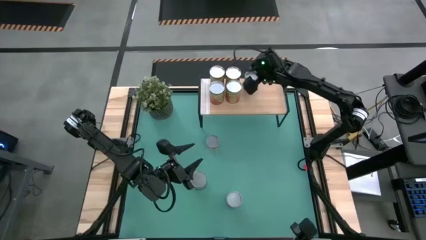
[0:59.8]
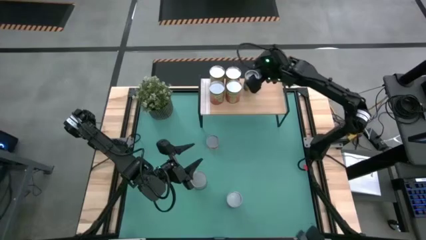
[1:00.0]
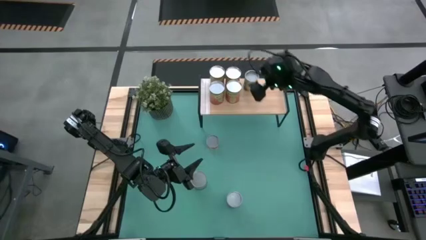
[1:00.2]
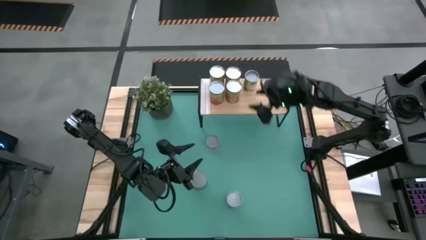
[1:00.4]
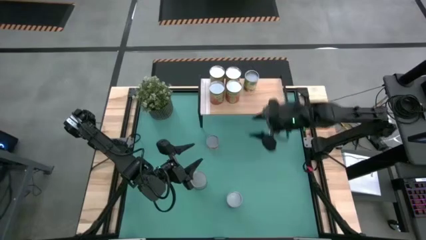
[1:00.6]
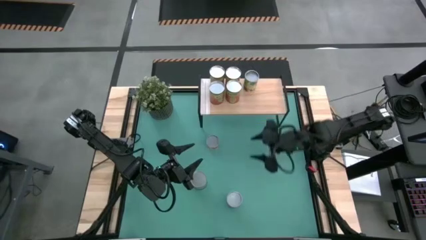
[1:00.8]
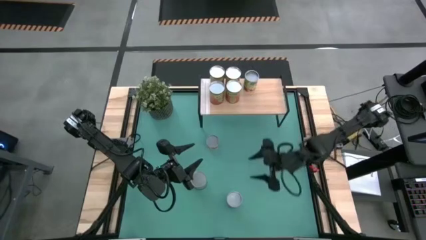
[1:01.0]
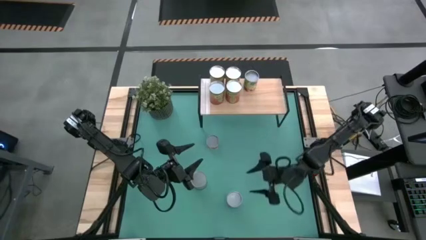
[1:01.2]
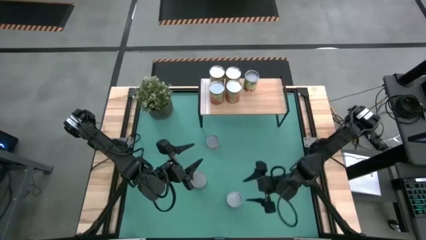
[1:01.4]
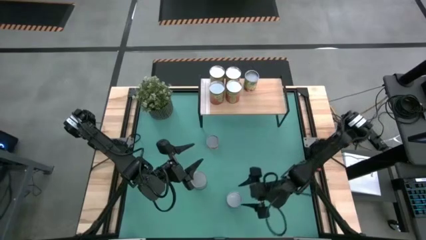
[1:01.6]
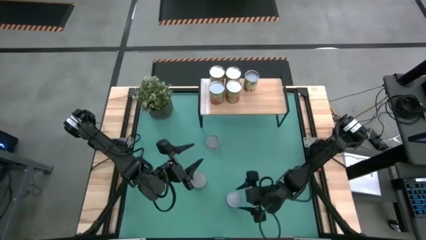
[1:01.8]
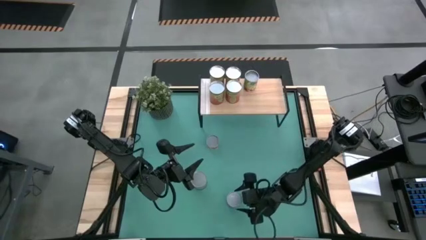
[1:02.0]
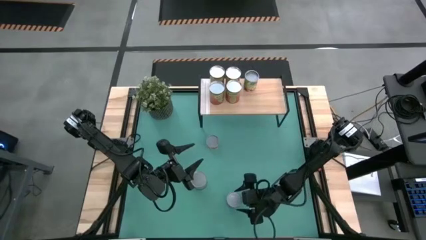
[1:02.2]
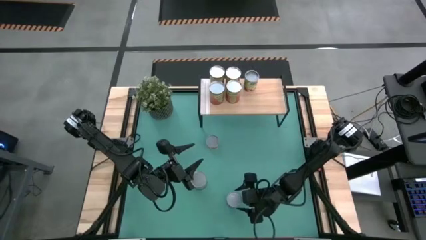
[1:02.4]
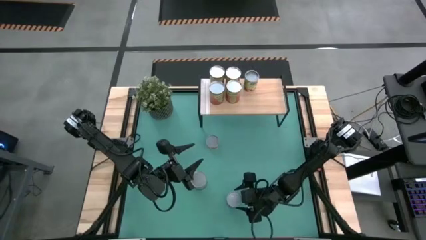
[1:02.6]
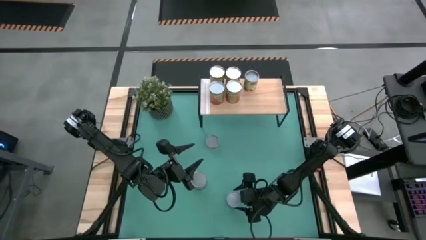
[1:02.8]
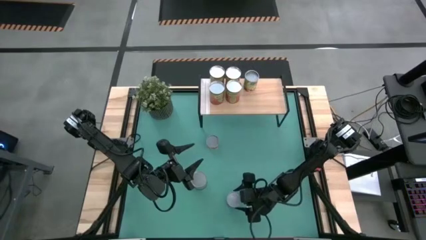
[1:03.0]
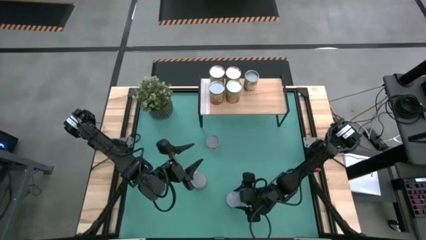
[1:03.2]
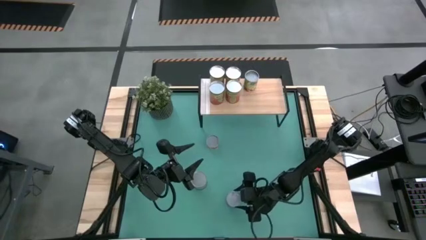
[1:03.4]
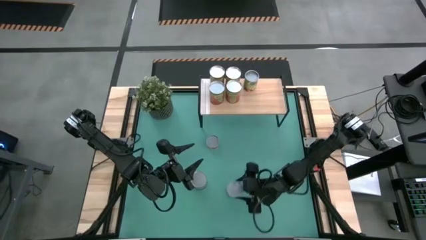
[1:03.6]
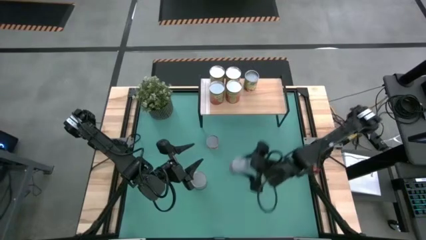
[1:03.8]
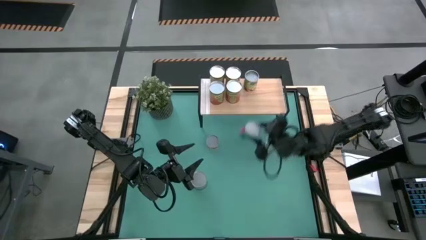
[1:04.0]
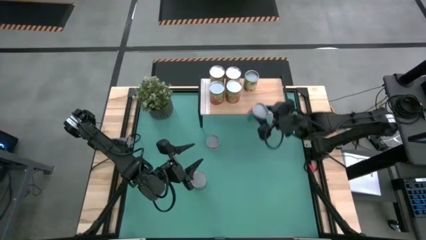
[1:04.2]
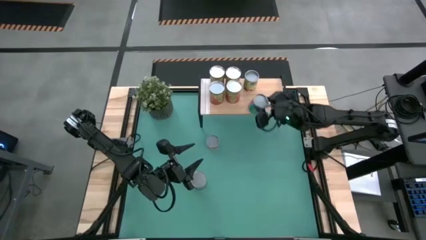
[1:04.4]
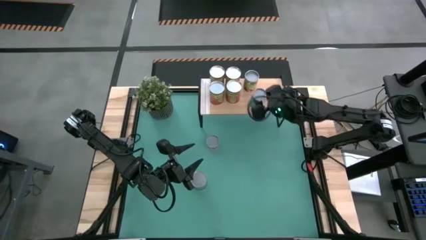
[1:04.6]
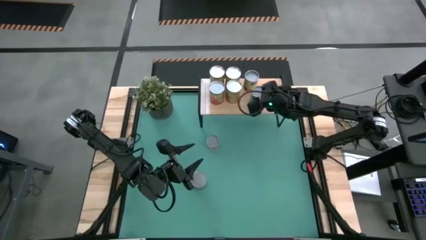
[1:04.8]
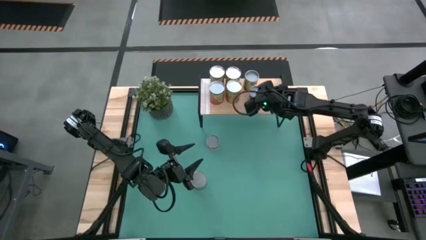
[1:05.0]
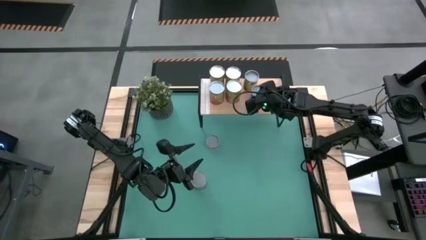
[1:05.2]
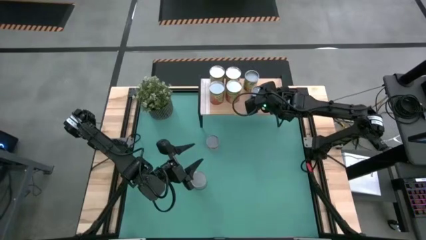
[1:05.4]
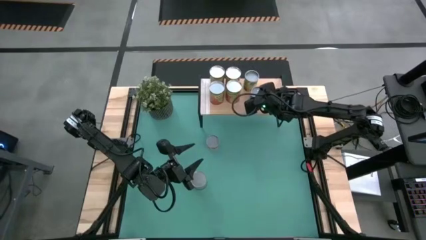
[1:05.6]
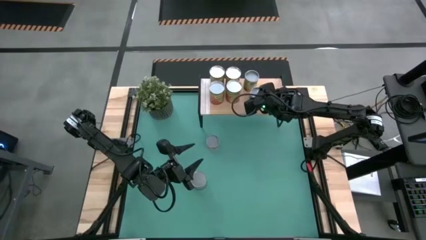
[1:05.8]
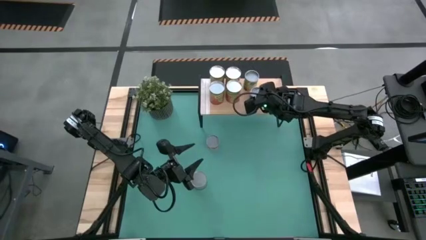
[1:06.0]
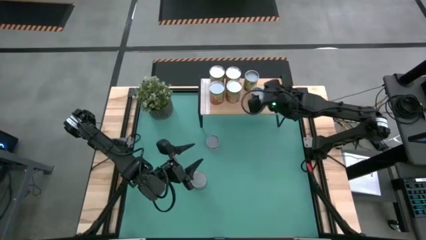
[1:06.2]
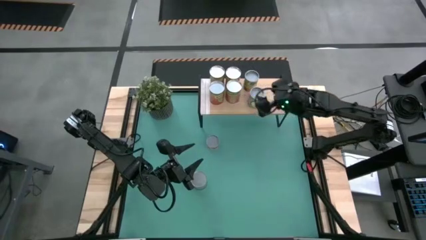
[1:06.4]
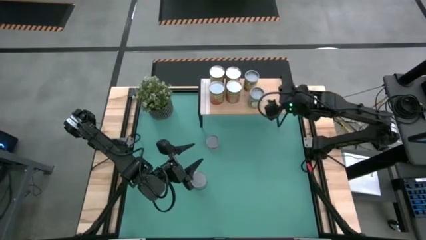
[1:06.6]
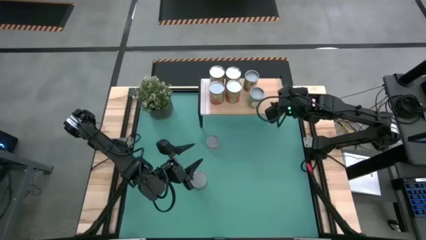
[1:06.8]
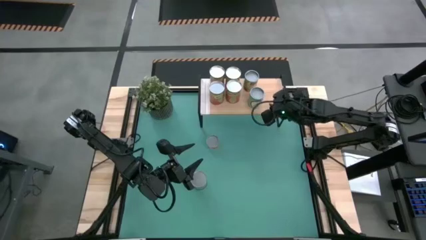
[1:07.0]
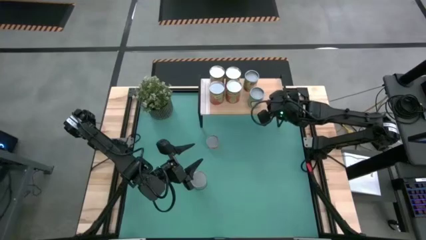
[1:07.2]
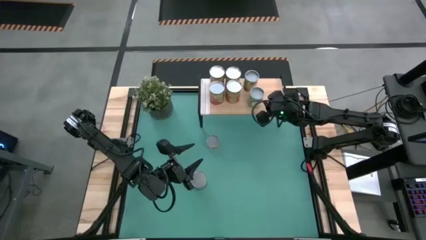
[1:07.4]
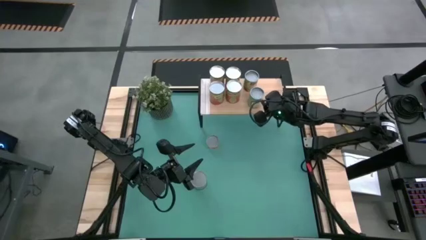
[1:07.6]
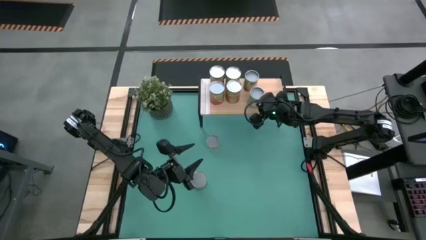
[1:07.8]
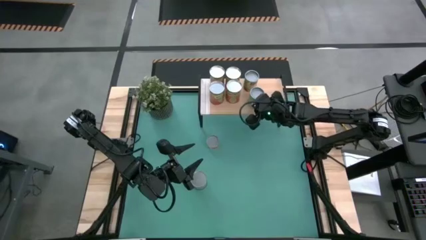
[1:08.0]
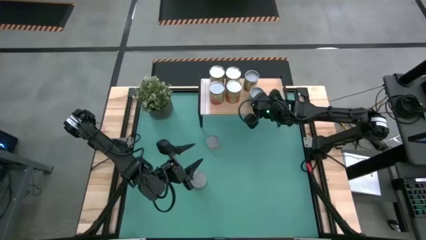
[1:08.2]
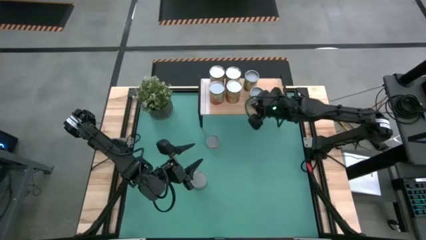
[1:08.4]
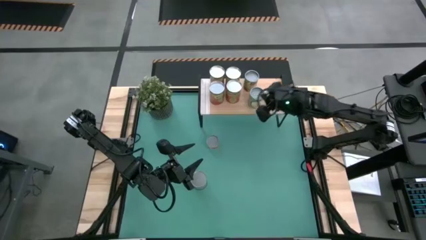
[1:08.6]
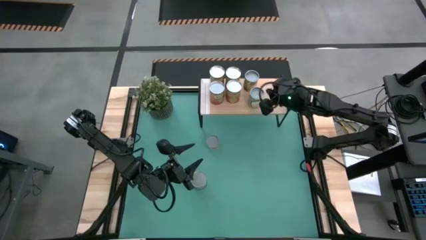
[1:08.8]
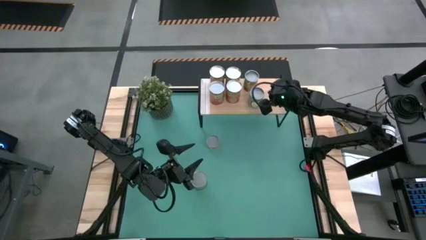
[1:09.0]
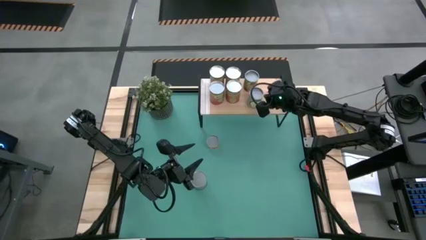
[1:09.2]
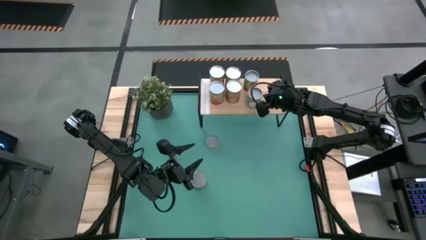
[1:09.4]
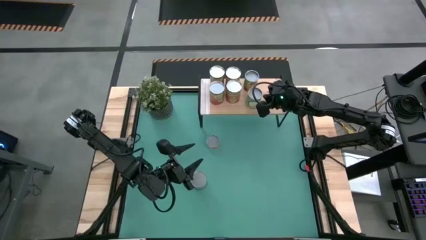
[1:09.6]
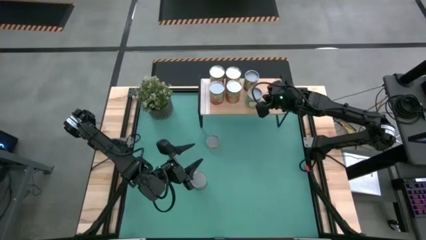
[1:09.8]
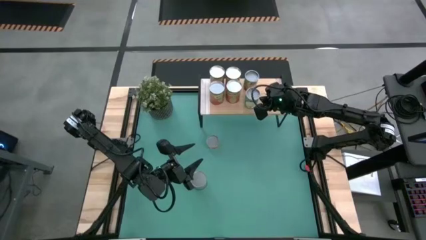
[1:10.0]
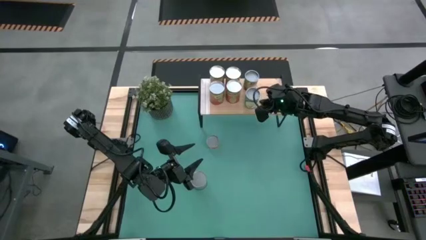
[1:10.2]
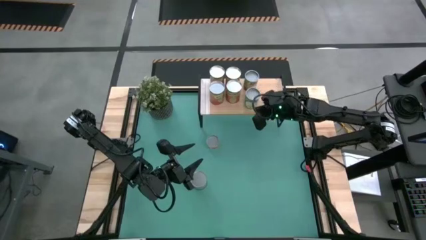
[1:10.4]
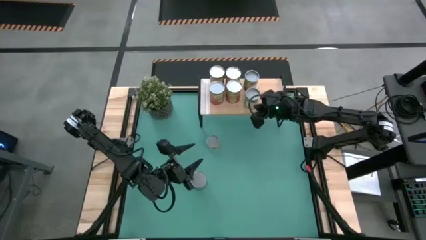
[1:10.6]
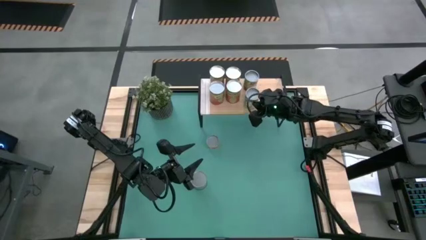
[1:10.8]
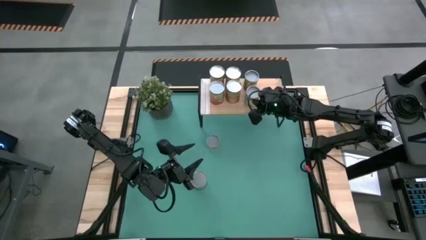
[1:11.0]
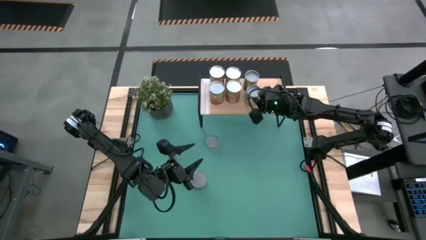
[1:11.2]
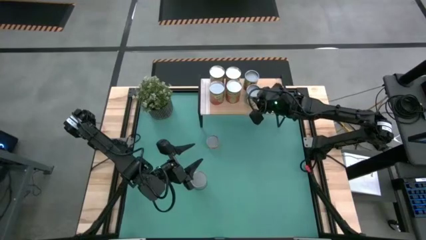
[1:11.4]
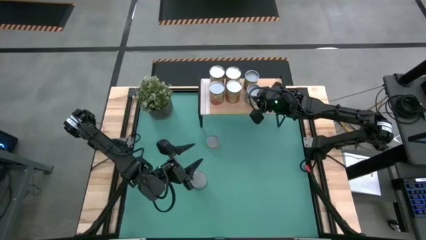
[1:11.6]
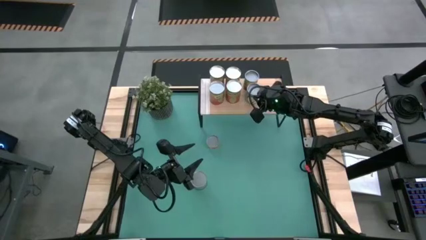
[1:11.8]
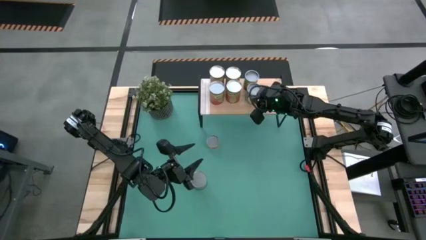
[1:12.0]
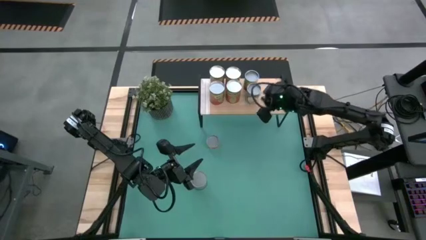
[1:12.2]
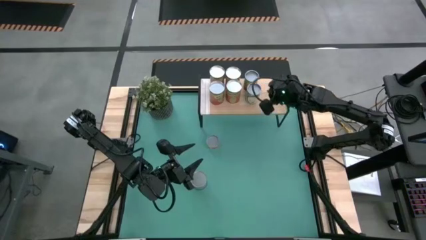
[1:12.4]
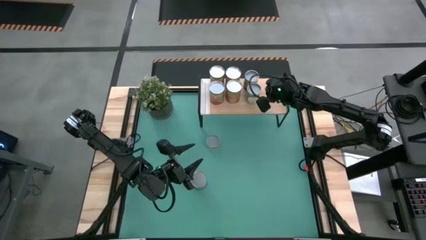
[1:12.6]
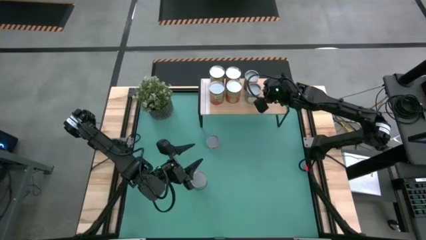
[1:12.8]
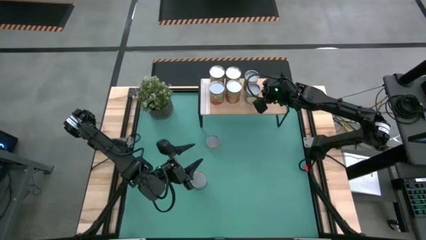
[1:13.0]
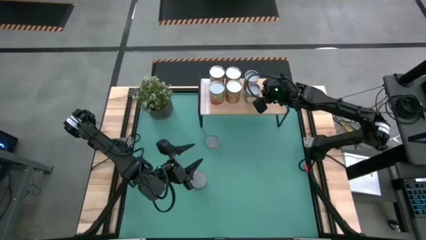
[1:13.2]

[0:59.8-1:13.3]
Task: Pick and place cans onto a shelf
Put the canned chicken soup on the shelf
